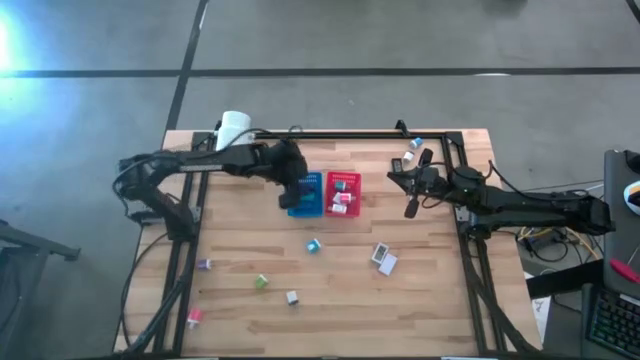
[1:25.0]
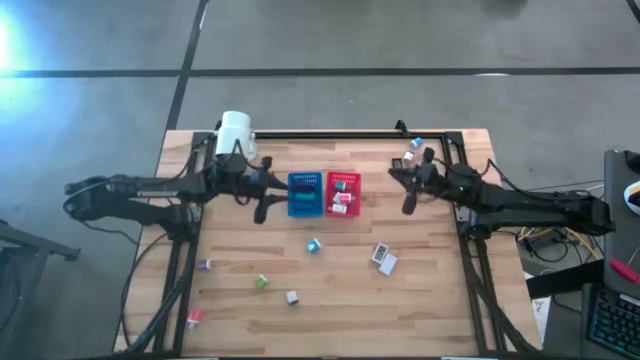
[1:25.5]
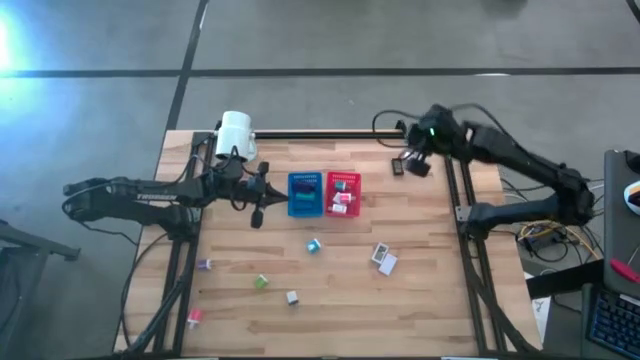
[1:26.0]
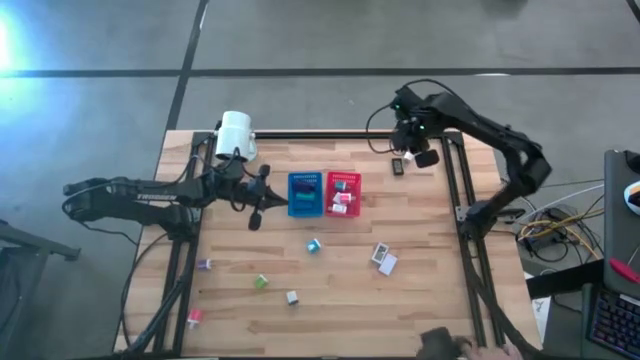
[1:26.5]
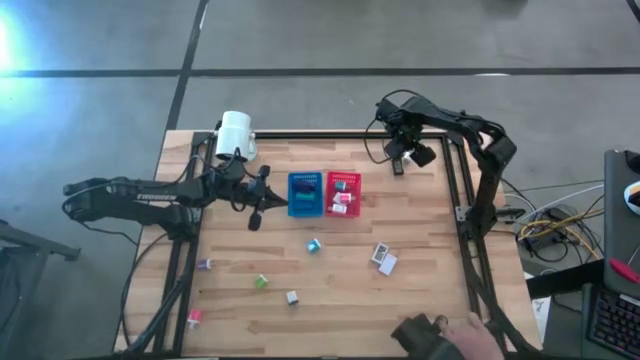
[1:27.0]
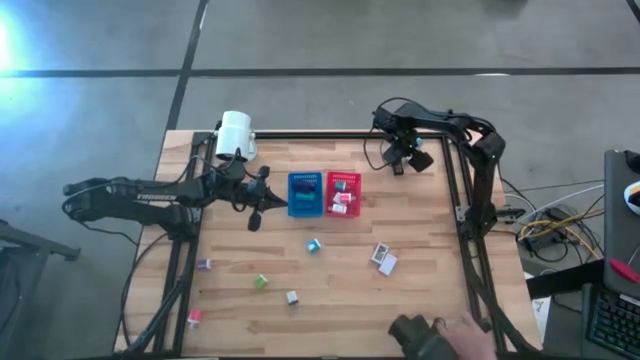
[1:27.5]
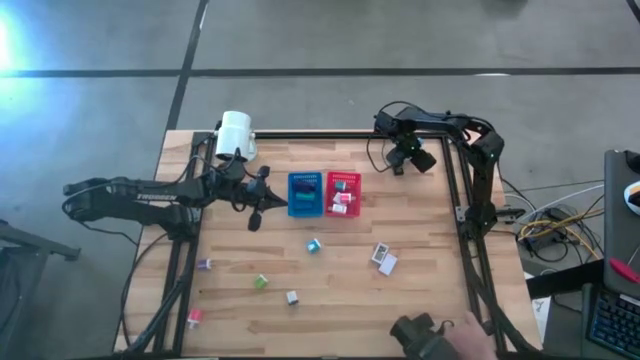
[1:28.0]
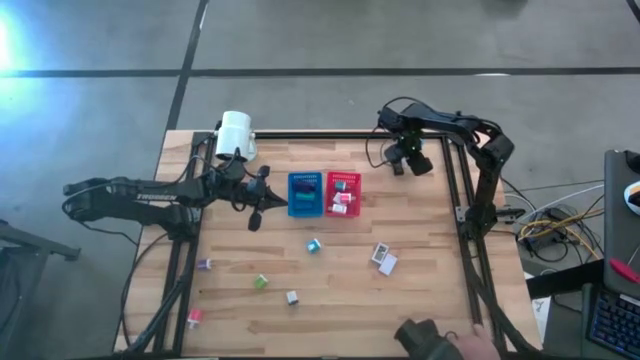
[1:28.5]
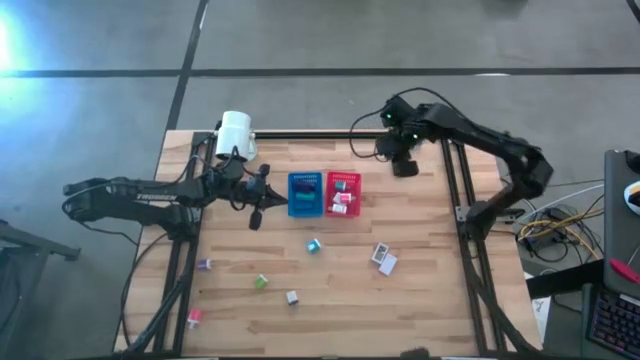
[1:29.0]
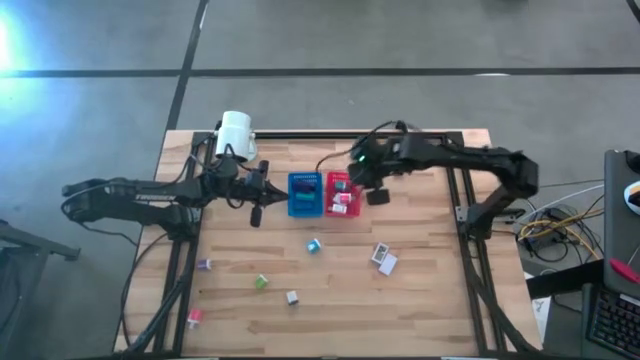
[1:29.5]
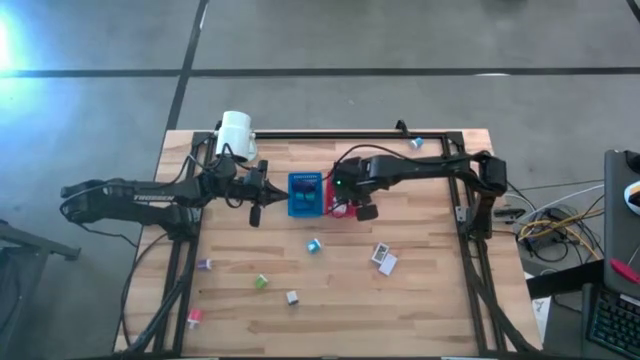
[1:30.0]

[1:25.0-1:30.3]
Task: Pick & Place Office items
Put the top white and black charger adapter into the red bin

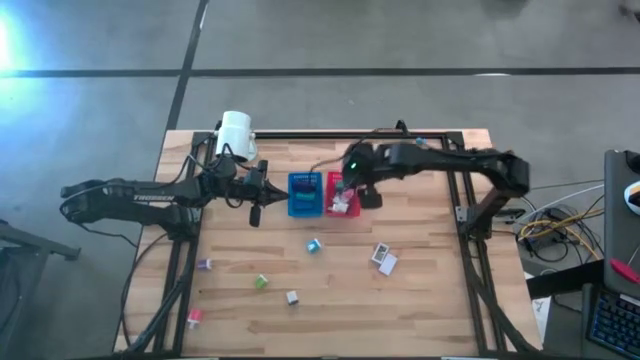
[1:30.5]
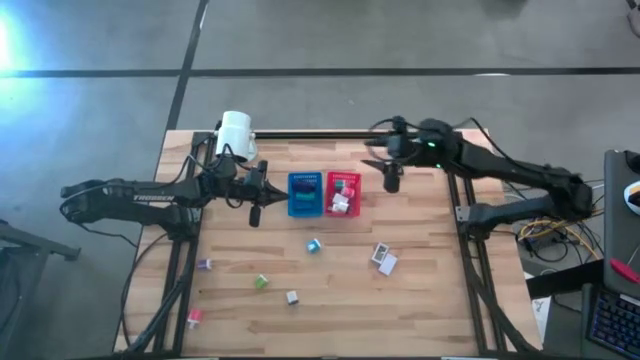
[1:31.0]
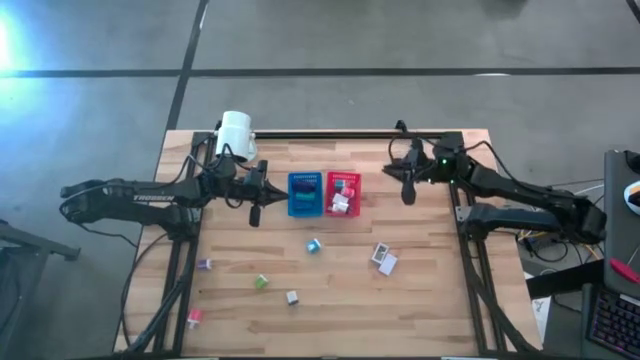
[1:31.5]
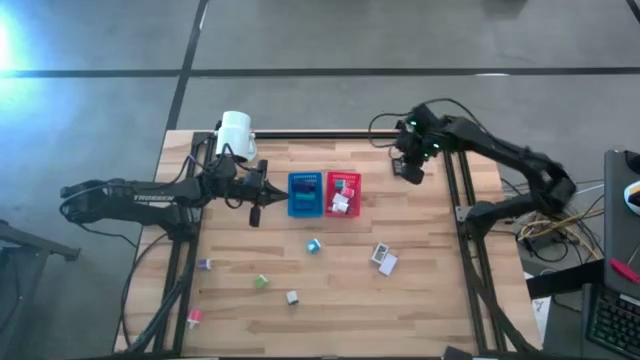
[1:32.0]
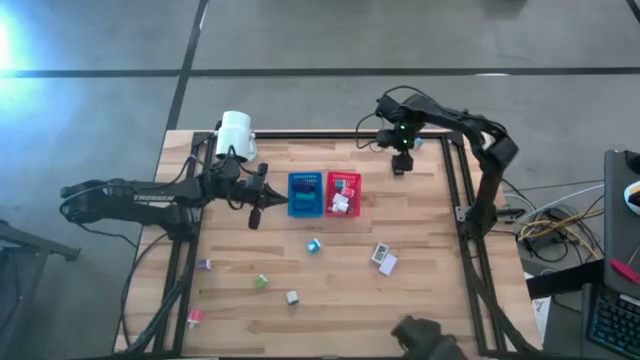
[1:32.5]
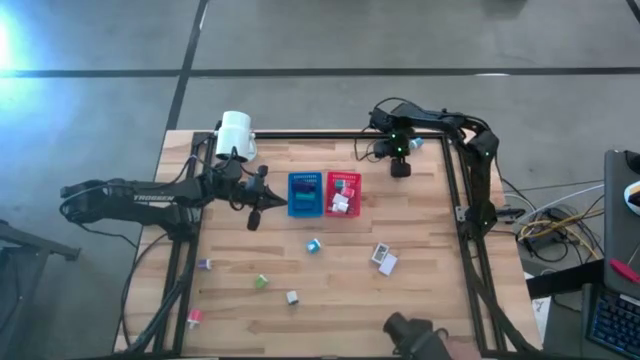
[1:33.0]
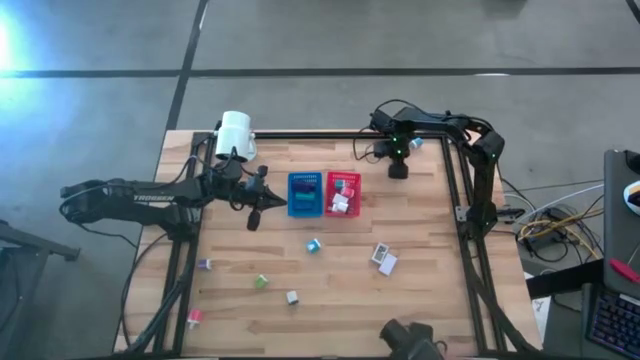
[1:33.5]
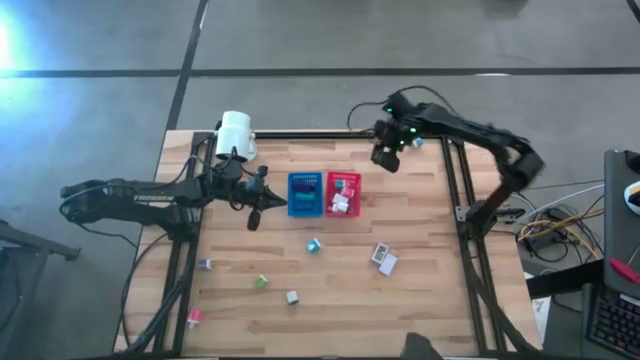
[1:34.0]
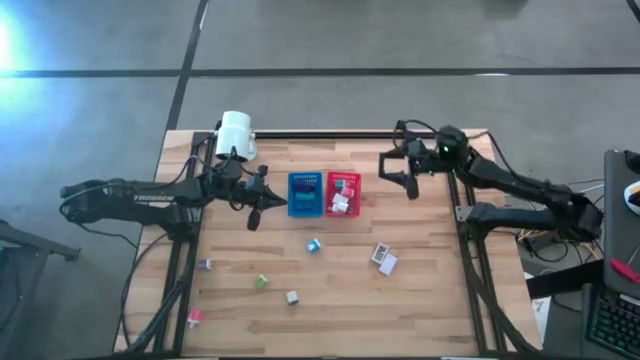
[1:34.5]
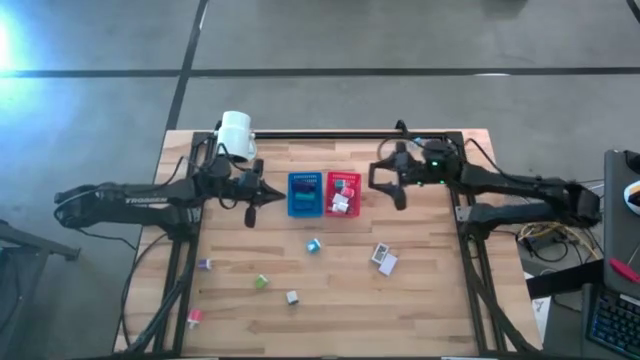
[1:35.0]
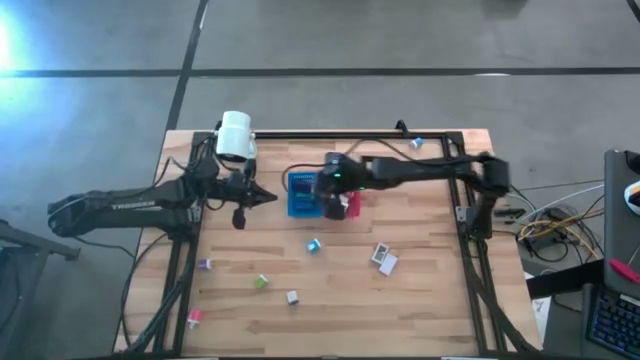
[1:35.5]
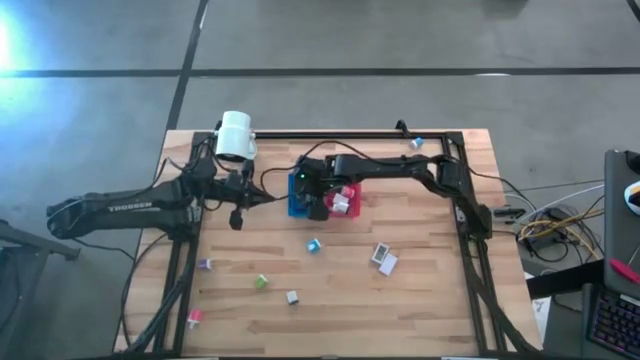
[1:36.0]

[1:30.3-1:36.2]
Put the black digital clock into the blue bin

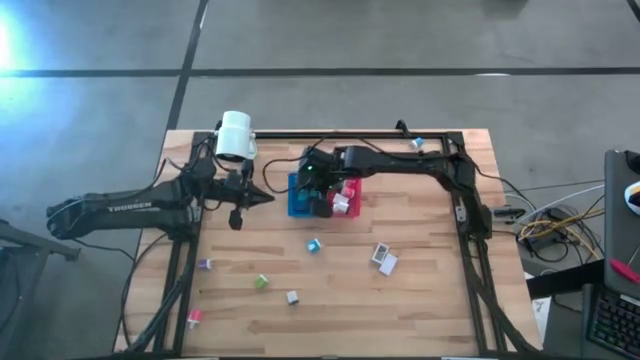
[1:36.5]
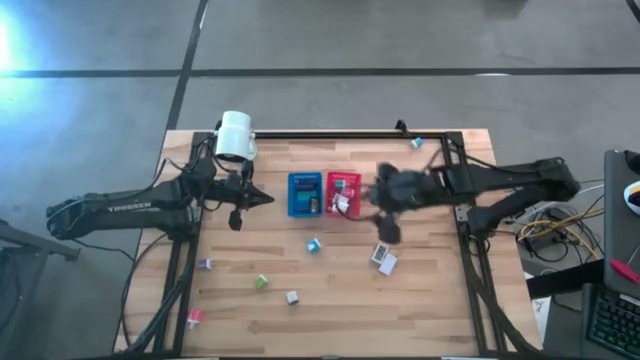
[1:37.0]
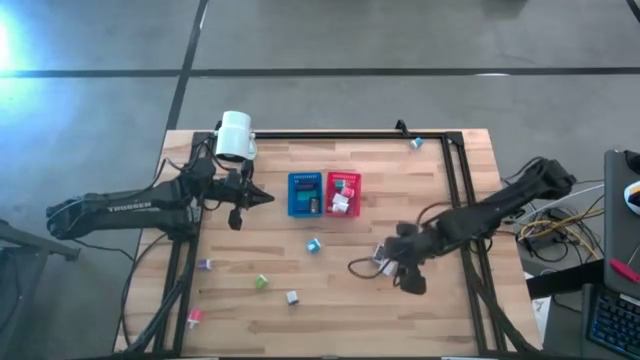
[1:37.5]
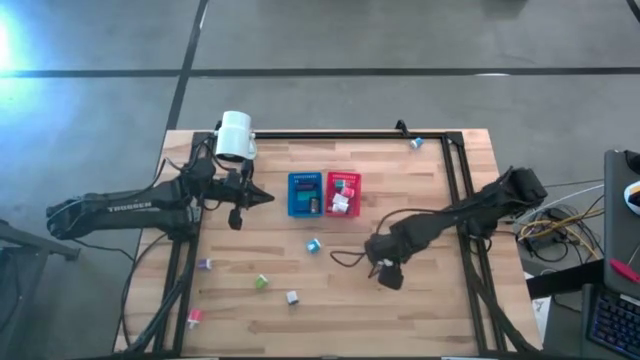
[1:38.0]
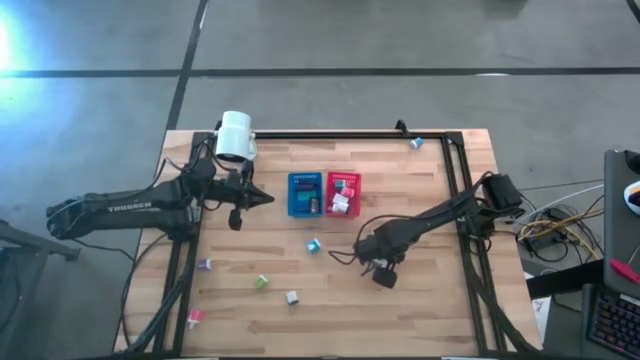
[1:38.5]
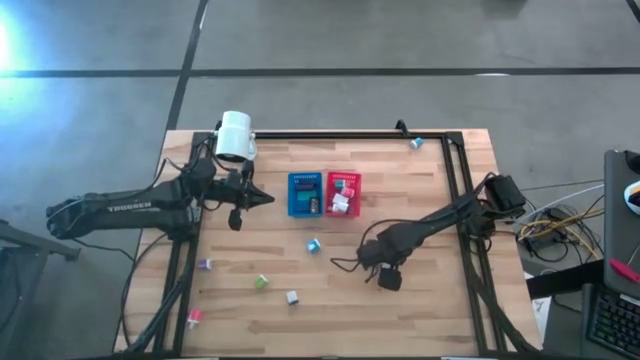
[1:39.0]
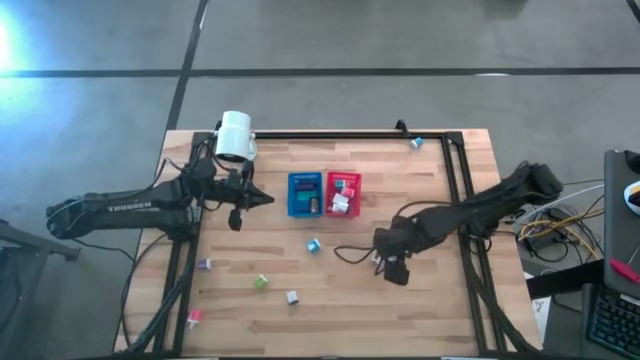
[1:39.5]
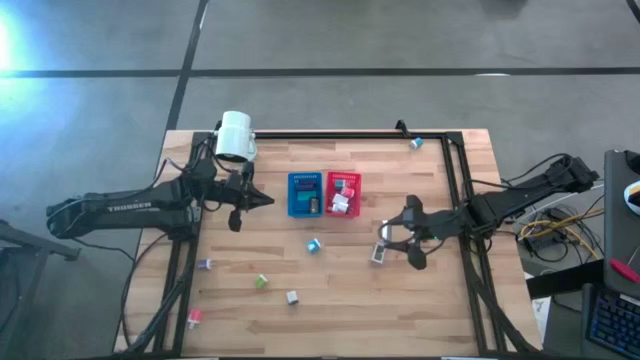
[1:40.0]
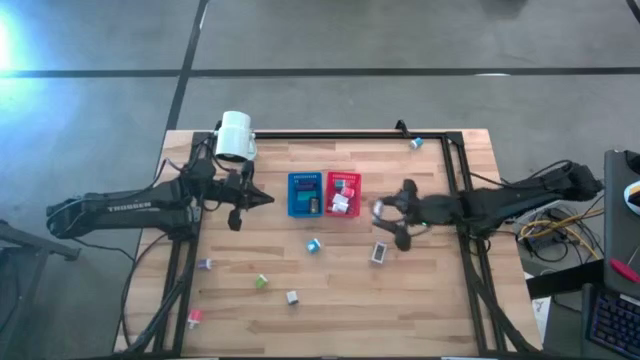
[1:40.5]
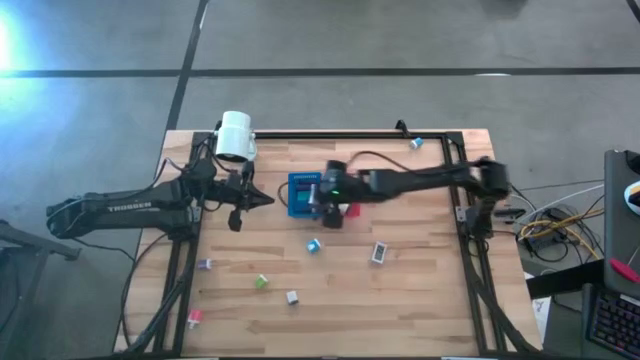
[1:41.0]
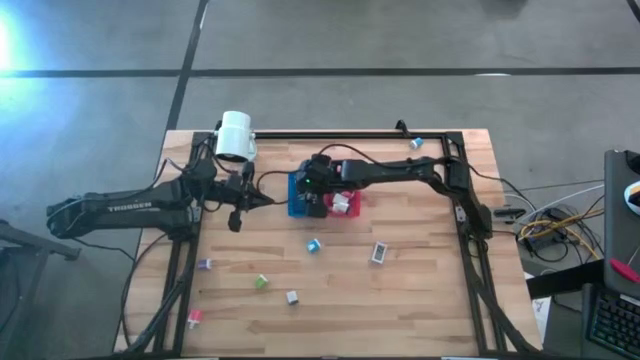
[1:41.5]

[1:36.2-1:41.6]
Put the right white digital clock into the blue bin

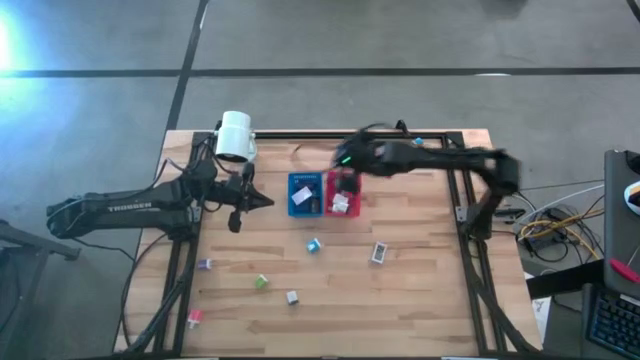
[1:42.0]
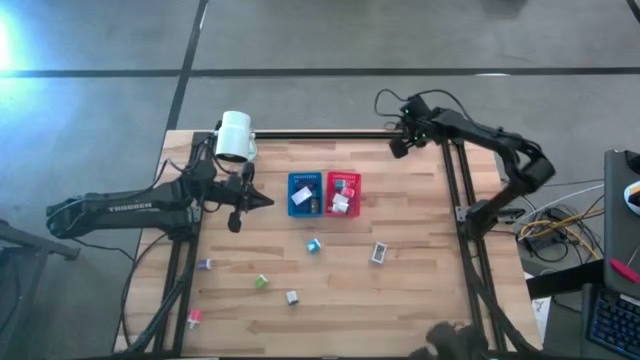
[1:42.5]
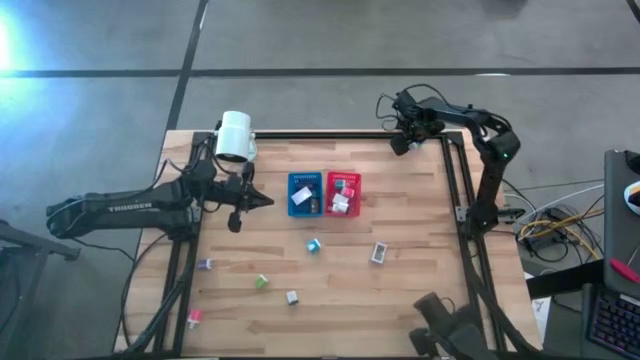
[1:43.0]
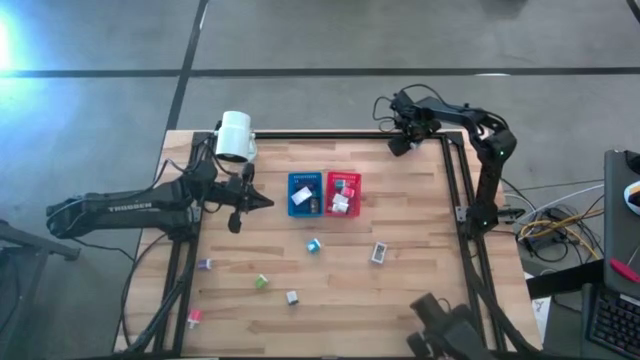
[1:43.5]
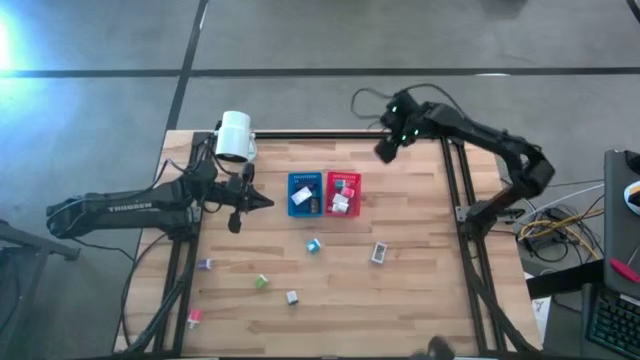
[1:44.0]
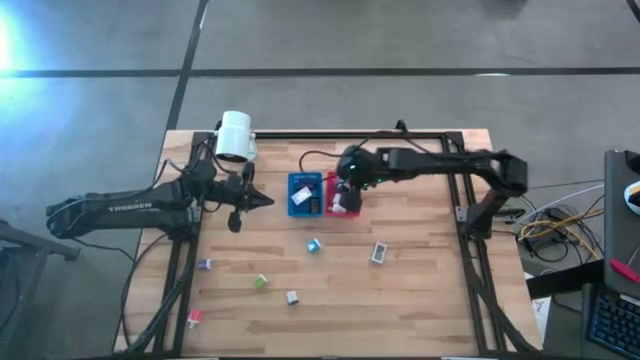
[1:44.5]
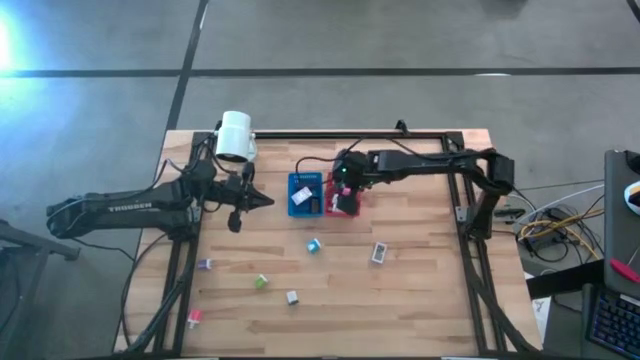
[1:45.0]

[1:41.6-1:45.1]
Put the top light blue charger adapter into the red bin

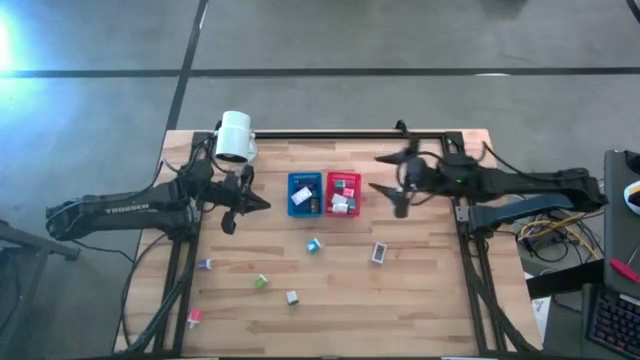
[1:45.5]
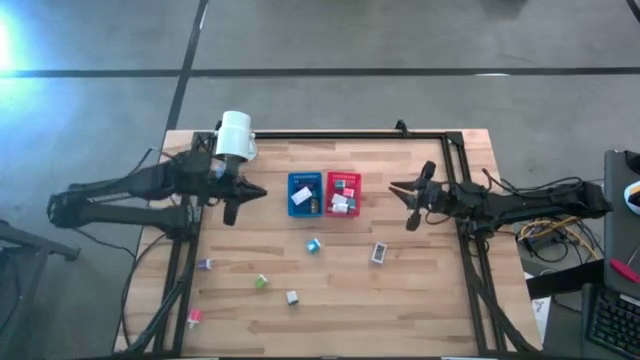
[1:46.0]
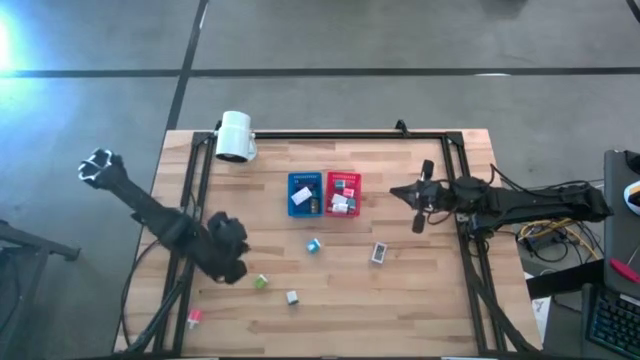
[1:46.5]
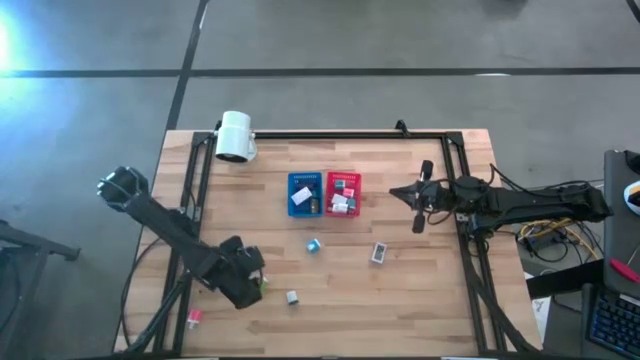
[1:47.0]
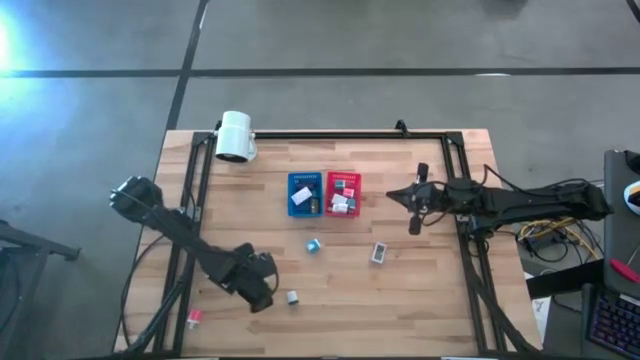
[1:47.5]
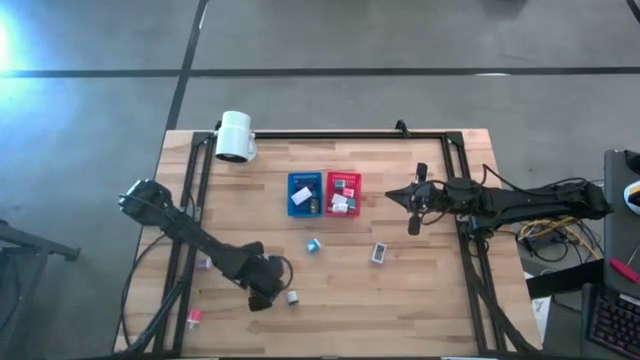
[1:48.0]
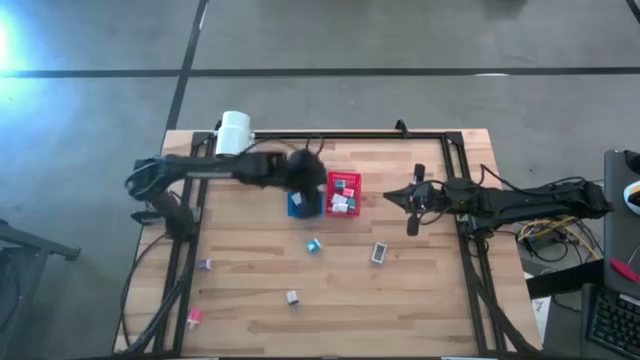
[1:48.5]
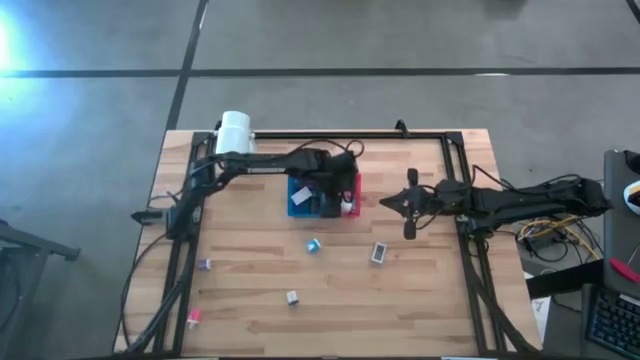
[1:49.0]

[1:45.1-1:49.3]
Put the green charger adapter into the red bin
